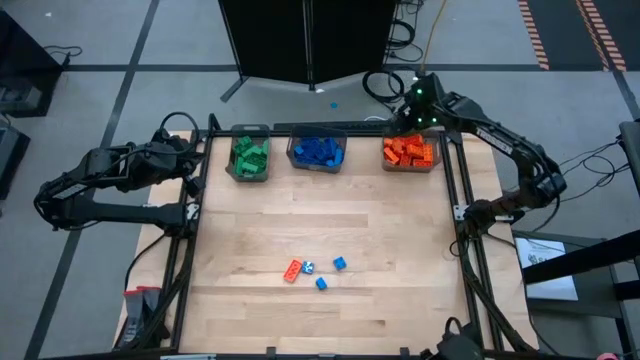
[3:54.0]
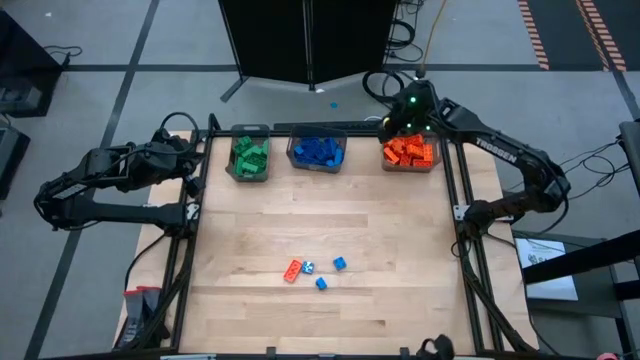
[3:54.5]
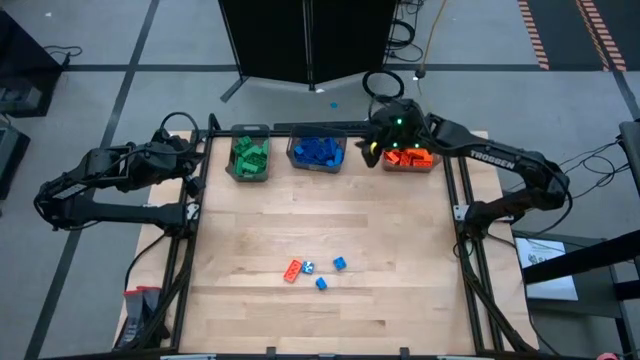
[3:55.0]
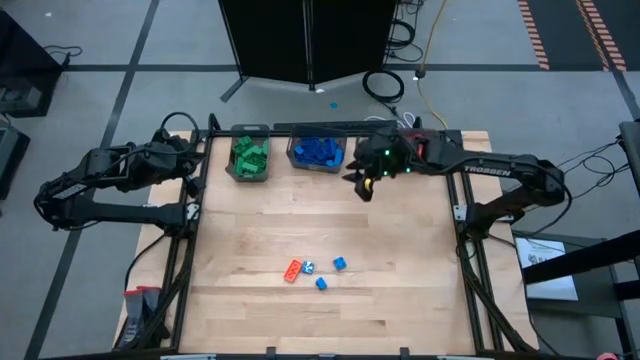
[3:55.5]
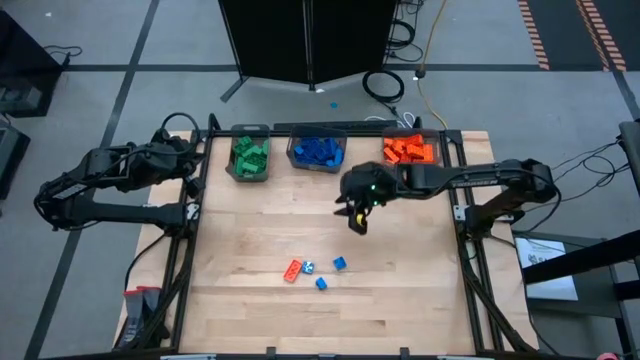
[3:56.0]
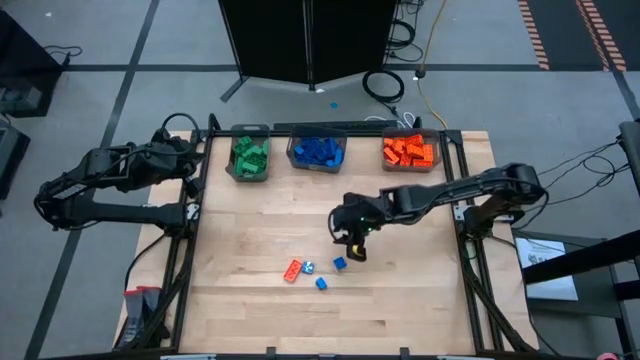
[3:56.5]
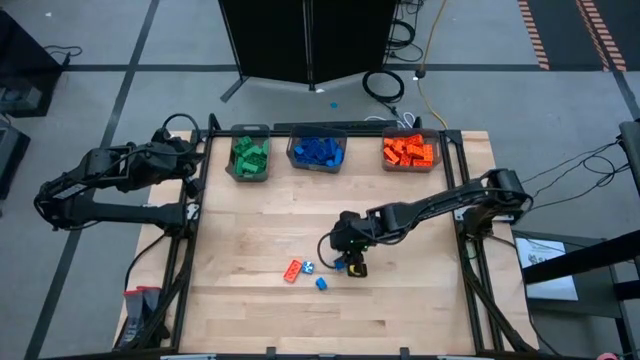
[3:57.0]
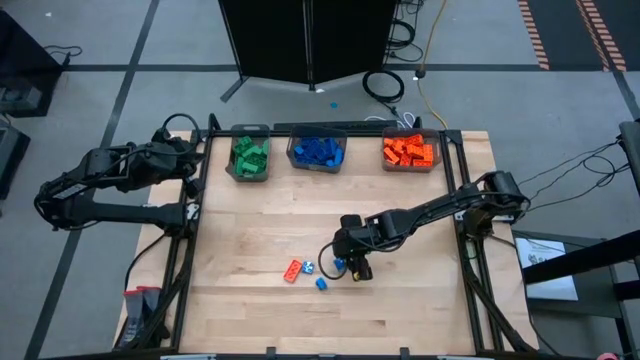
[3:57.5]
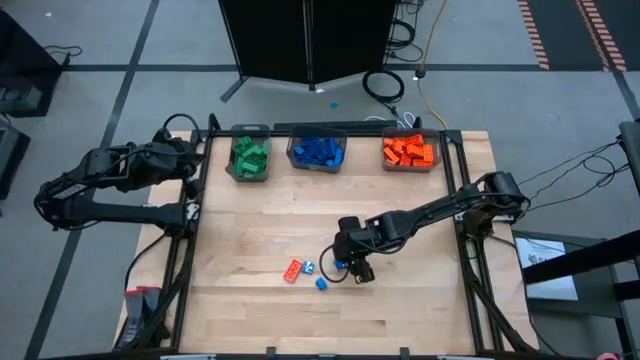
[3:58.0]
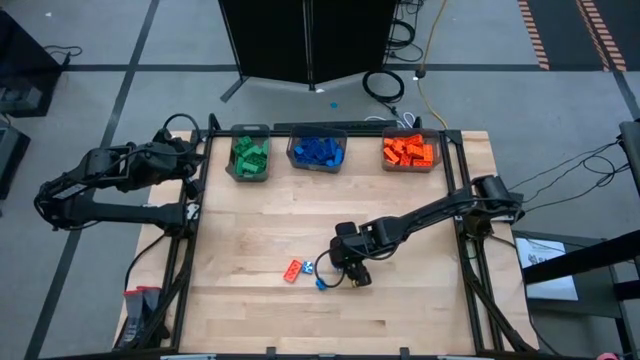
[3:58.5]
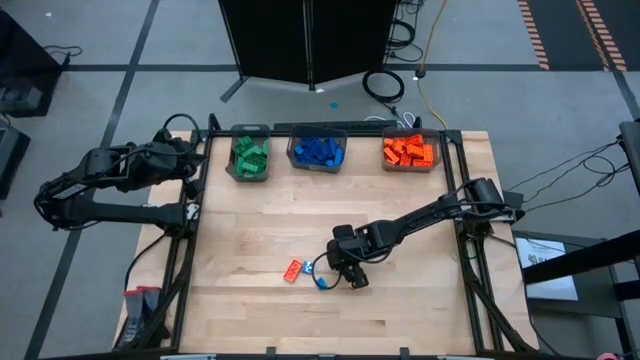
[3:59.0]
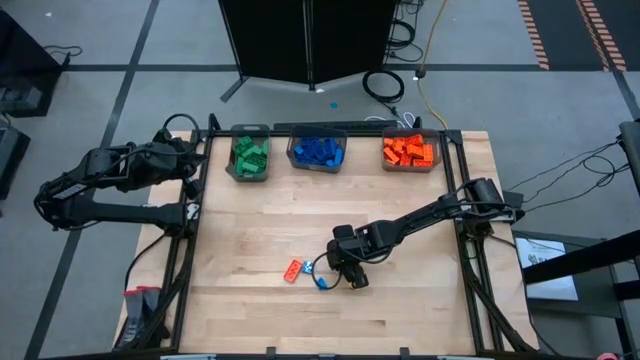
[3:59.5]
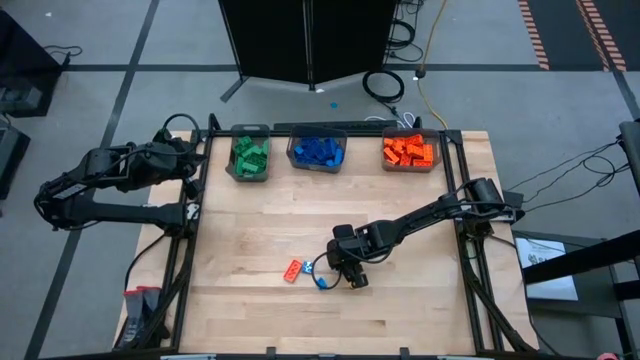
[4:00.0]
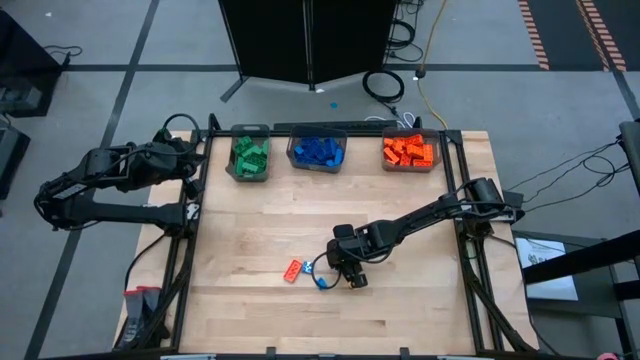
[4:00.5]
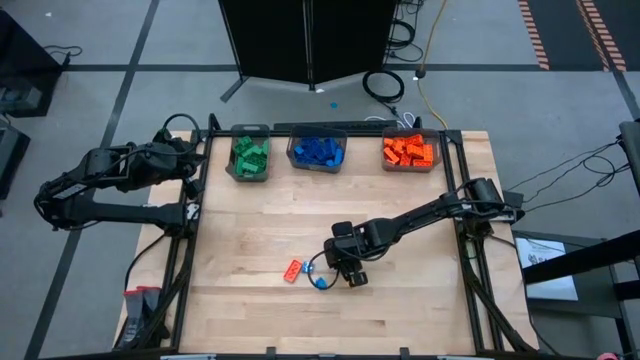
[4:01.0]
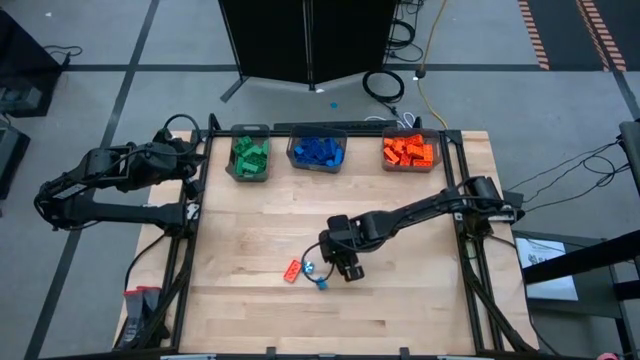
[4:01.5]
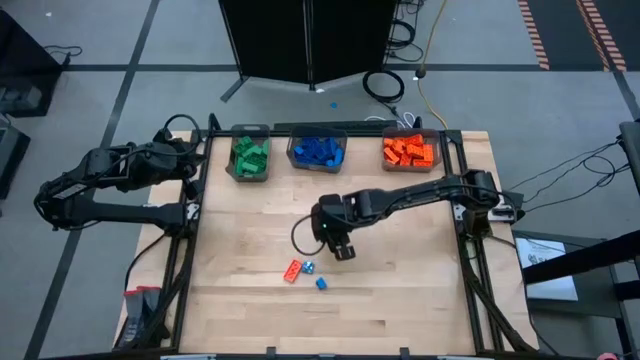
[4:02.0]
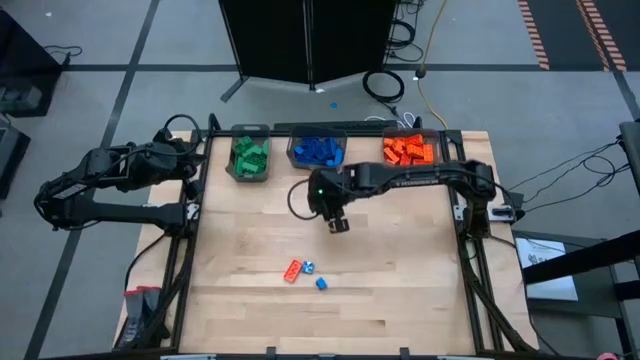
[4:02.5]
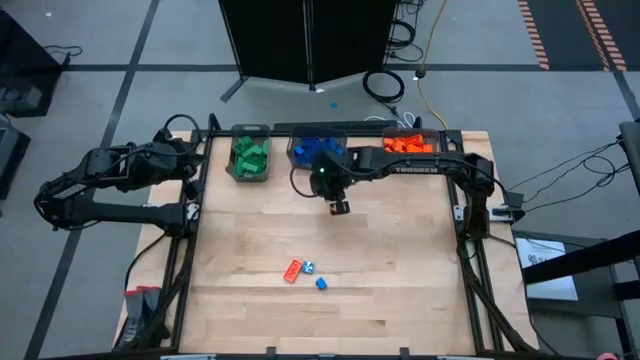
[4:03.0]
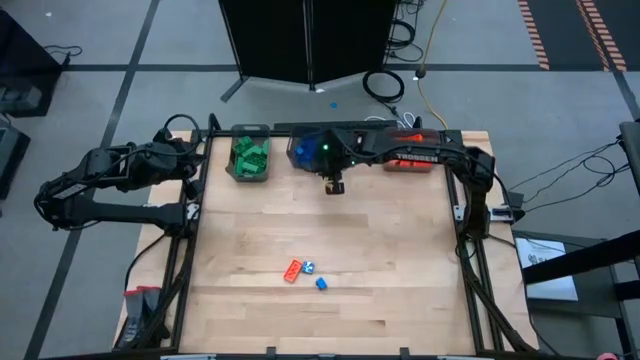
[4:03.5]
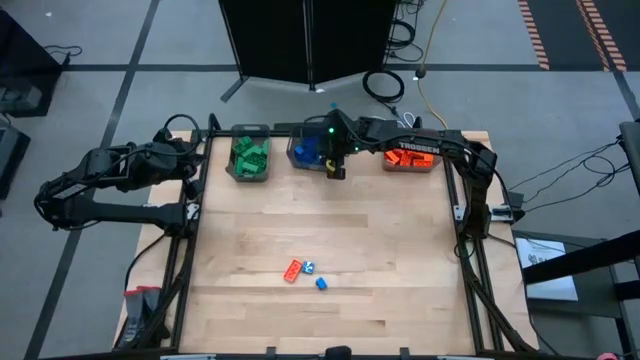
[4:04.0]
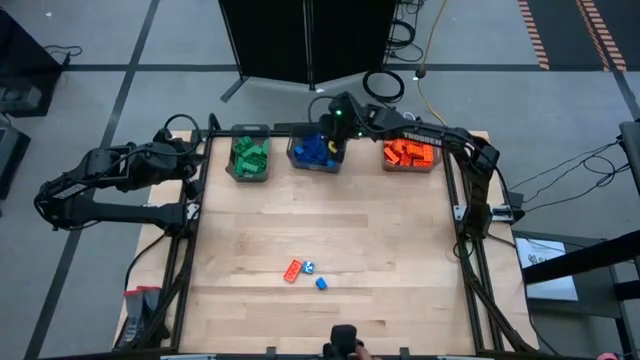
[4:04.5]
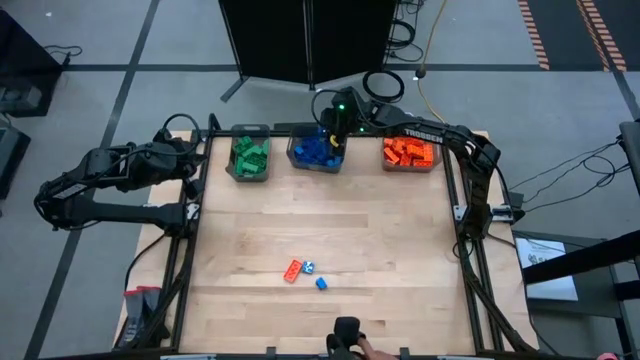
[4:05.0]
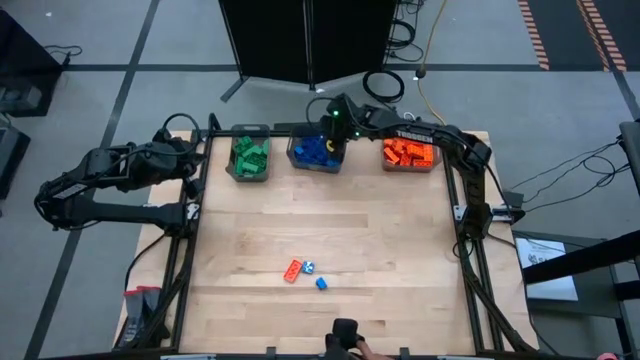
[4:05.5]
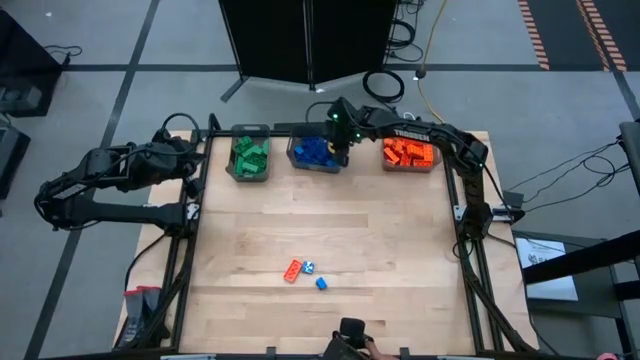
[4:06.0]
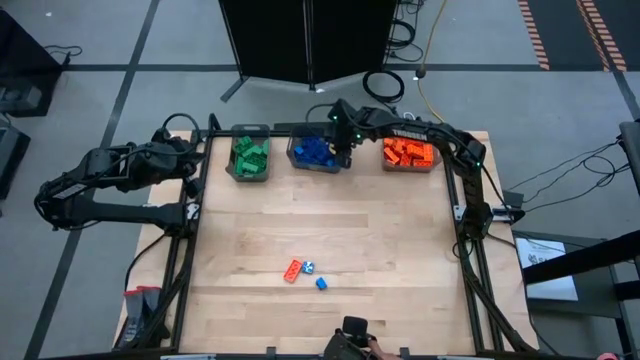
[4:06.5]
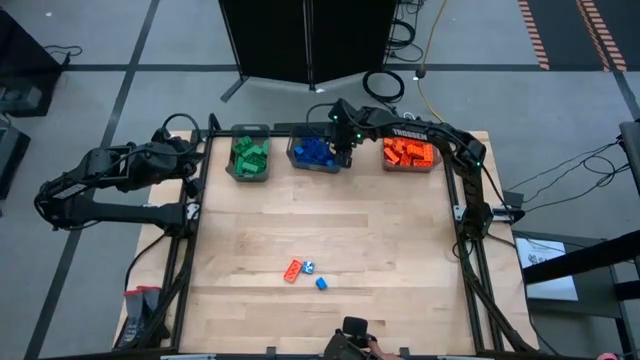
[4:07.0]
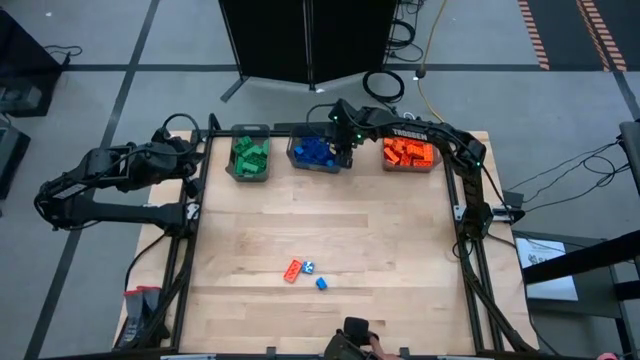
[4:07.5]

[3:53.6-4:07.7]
Task: Sort blocks
Put the blue game piece into the middle black bin

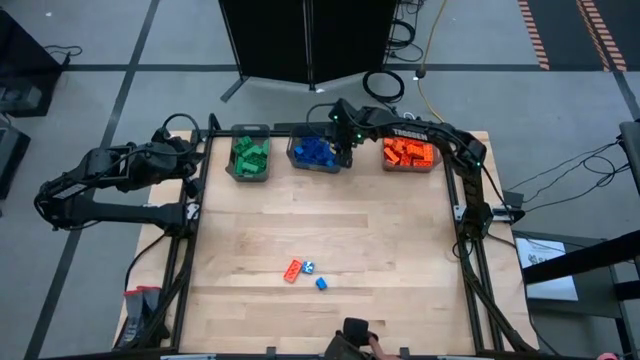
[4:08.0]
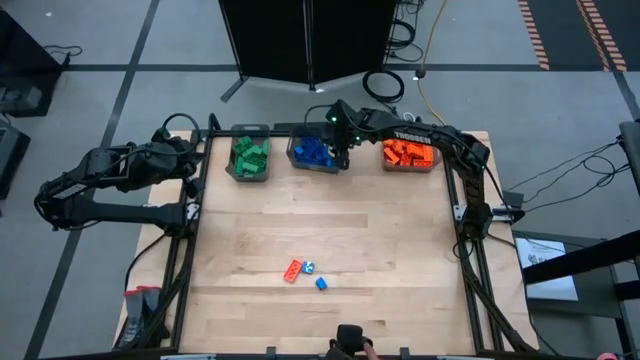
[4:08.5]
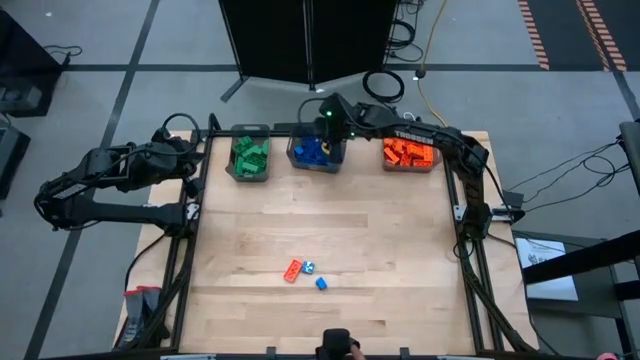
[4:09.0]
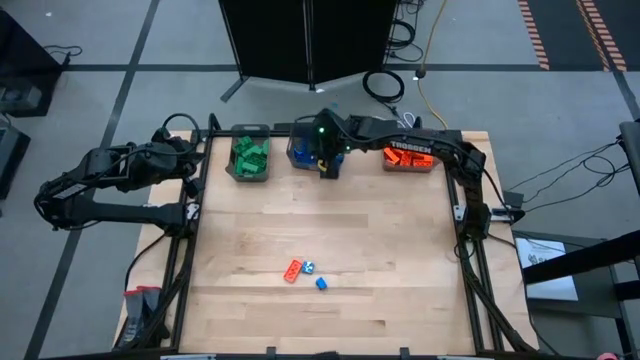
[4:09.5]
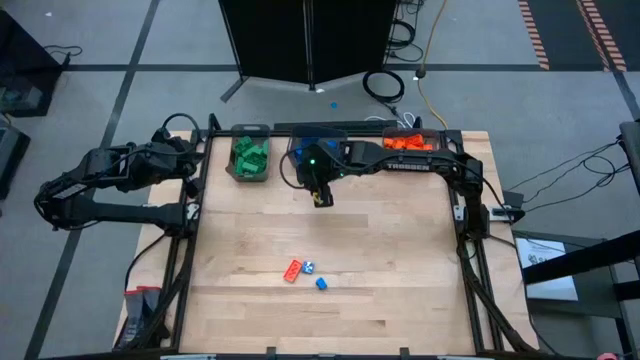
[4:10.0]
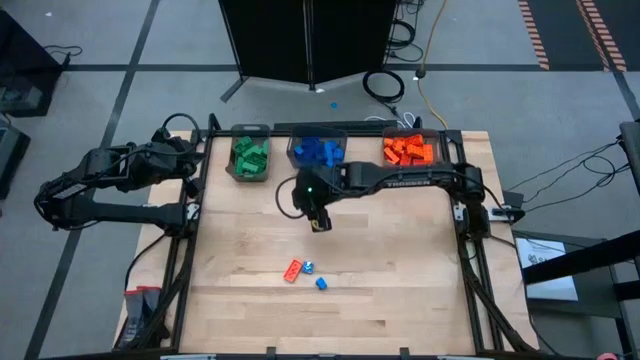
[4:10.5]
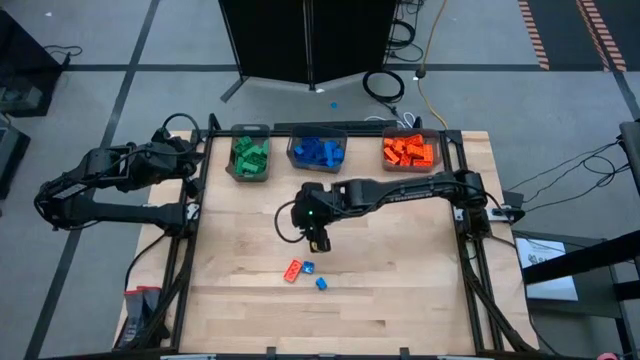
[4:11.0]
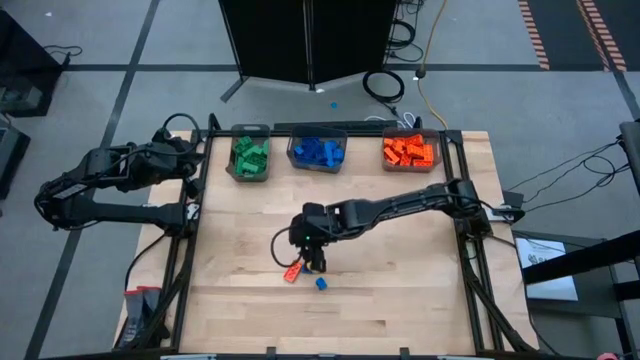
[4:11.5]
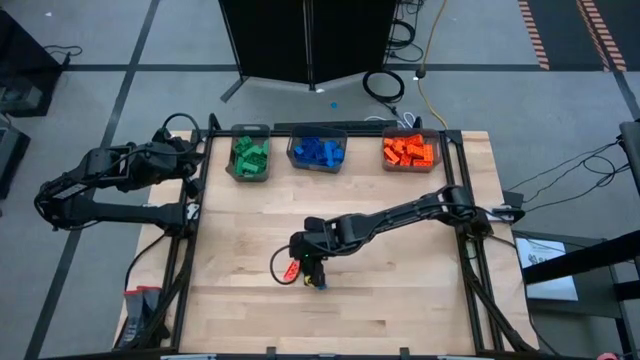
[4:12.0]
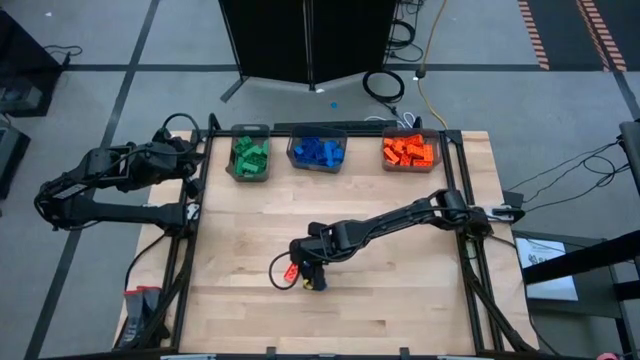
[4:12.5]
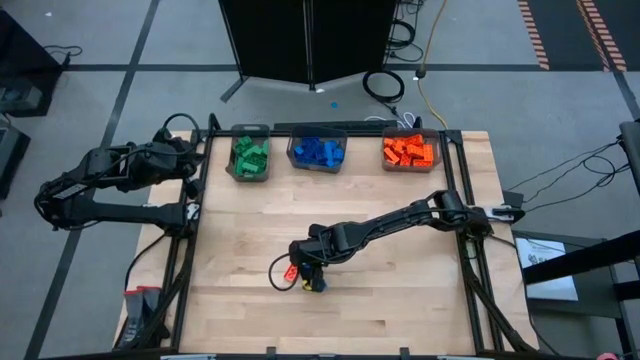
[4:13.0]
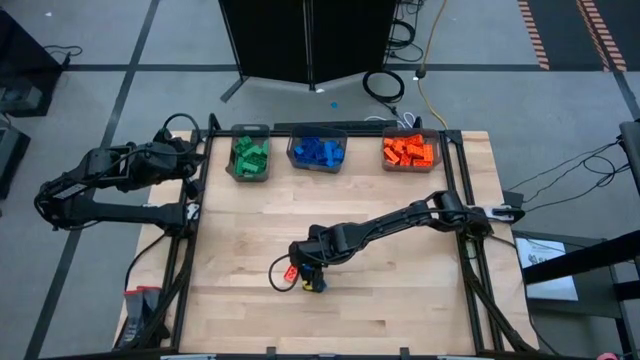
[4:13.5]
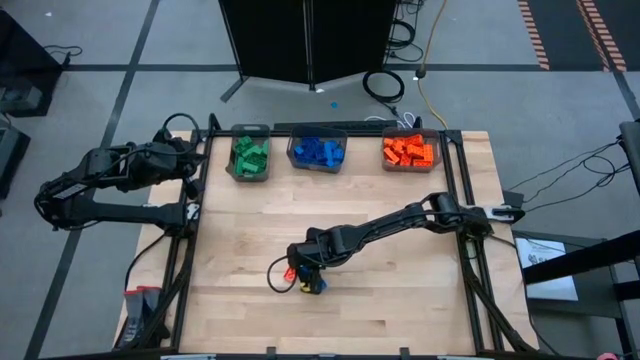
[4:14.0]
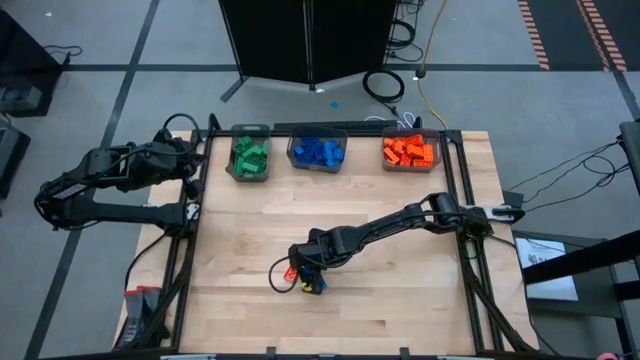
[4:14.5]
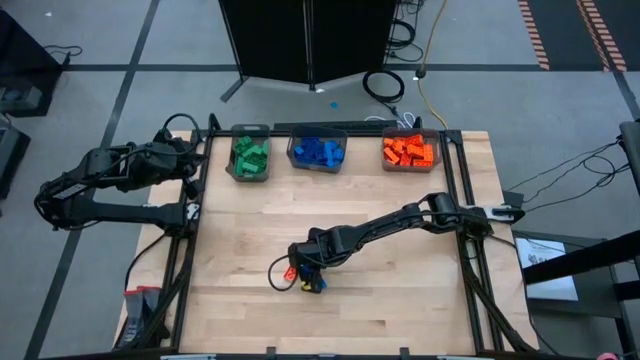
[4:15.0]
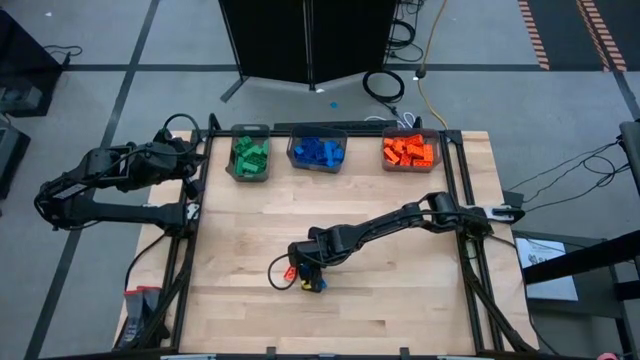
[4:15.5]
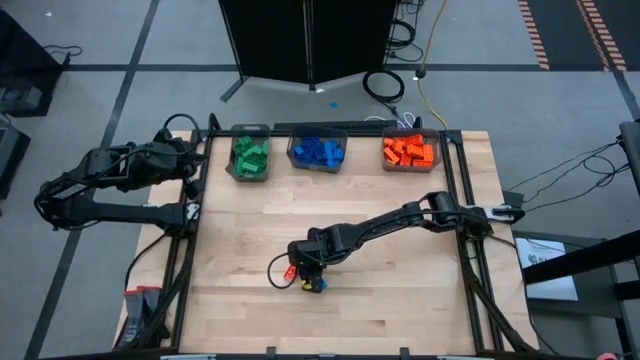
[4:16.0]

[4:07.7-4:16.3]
Put the blue game piece into the middle black bin
